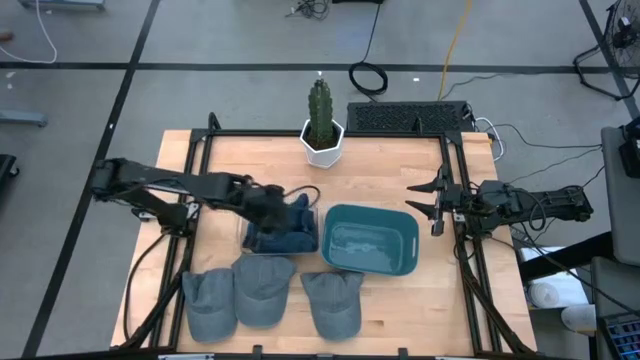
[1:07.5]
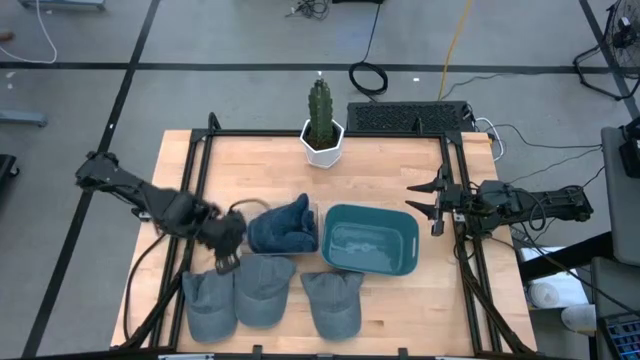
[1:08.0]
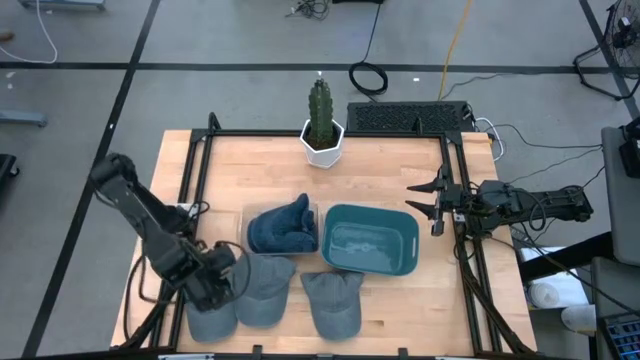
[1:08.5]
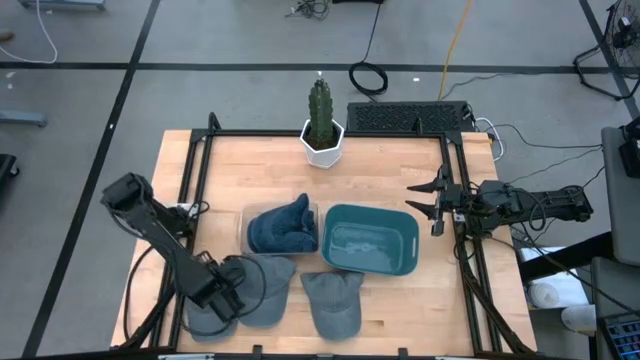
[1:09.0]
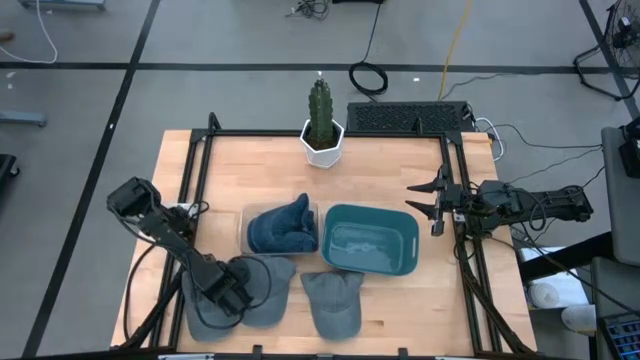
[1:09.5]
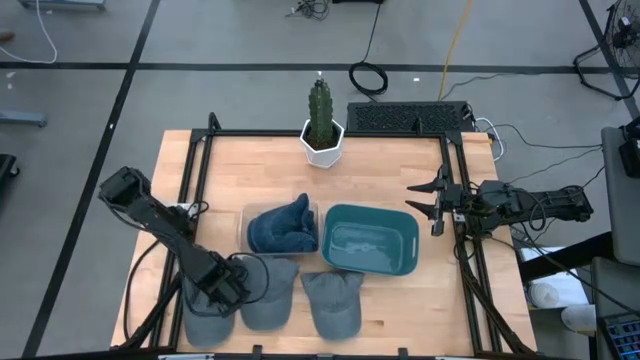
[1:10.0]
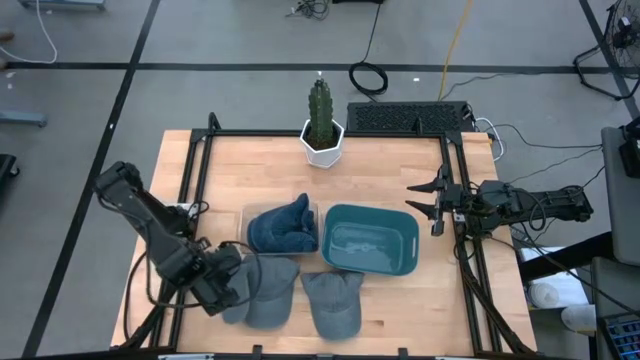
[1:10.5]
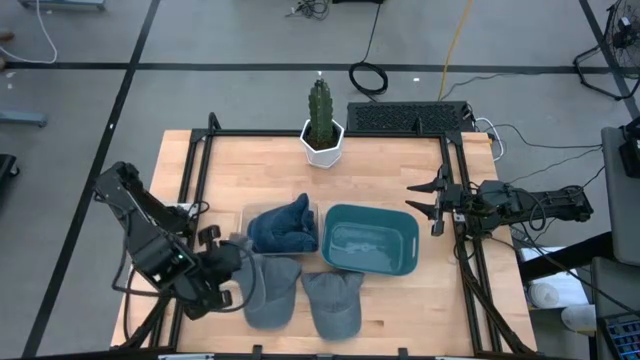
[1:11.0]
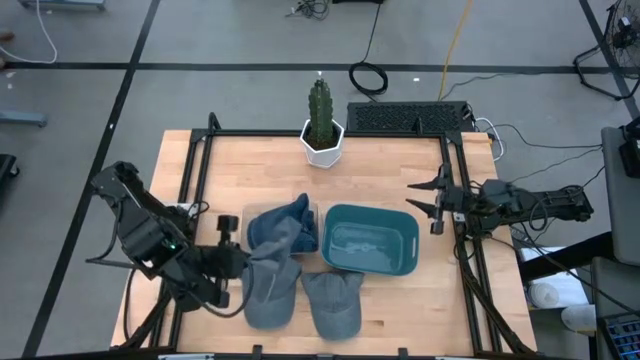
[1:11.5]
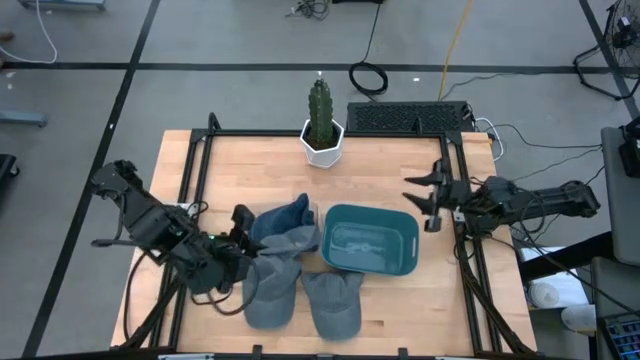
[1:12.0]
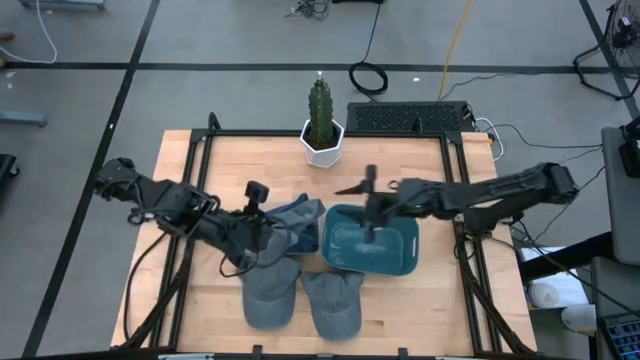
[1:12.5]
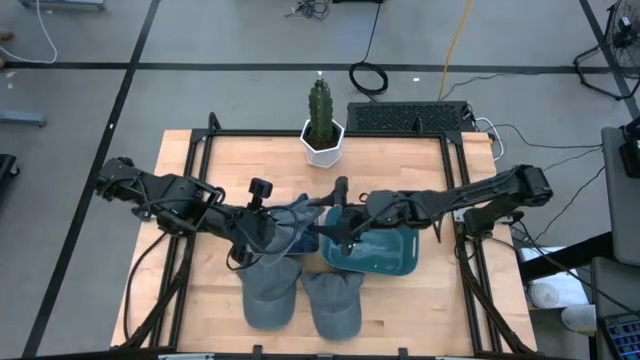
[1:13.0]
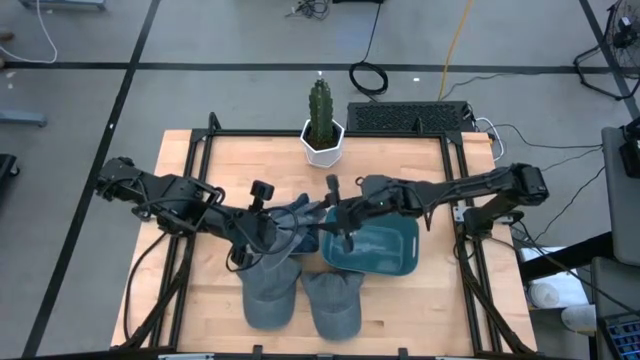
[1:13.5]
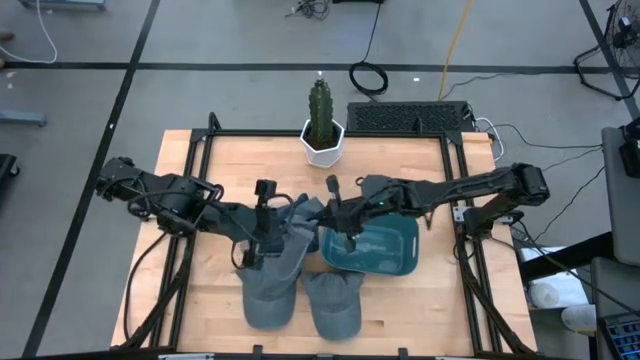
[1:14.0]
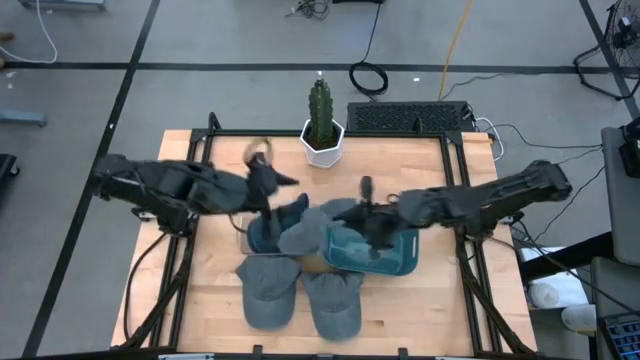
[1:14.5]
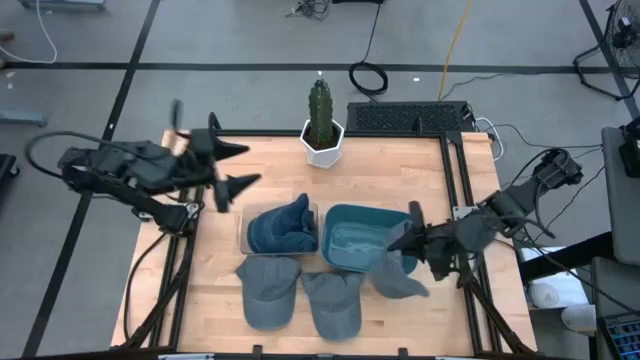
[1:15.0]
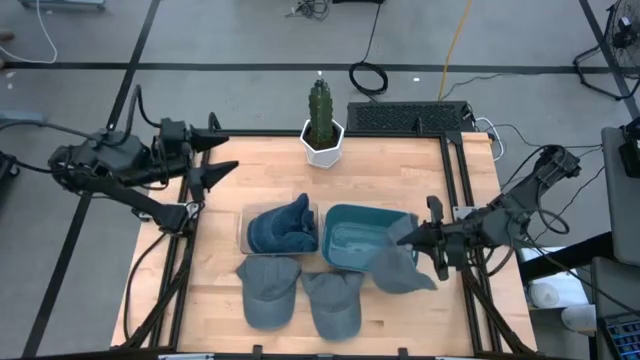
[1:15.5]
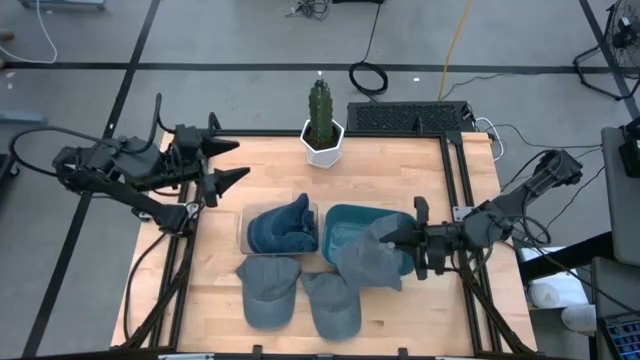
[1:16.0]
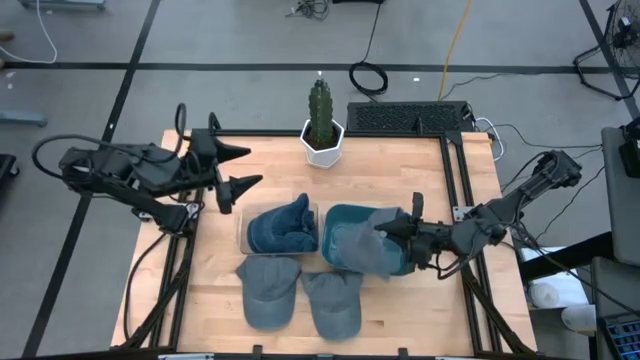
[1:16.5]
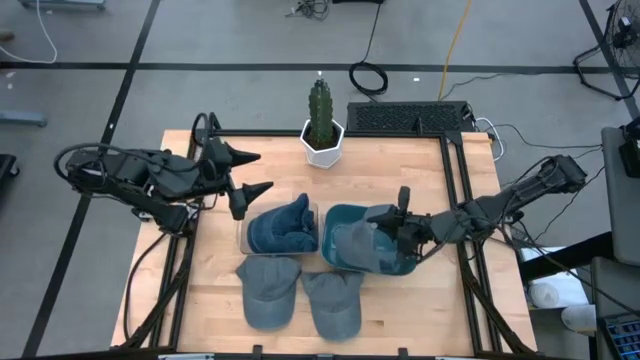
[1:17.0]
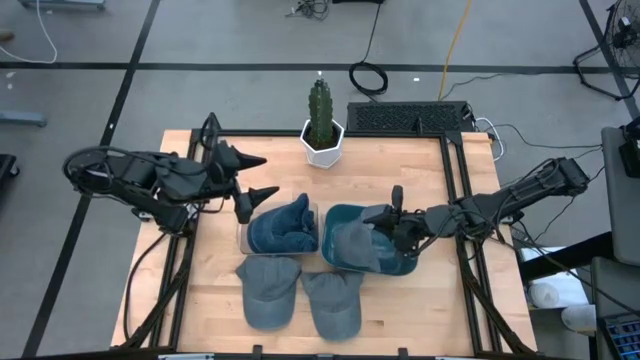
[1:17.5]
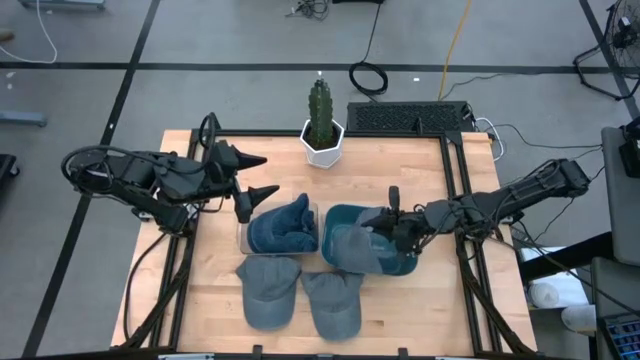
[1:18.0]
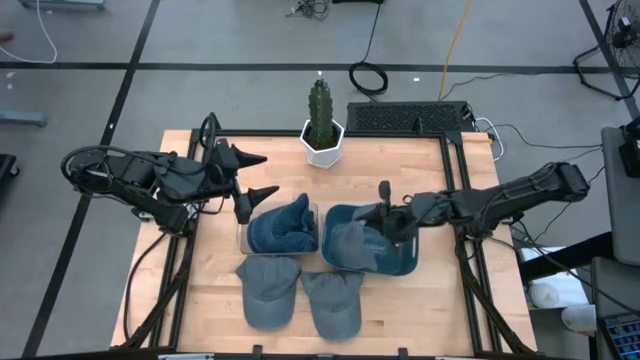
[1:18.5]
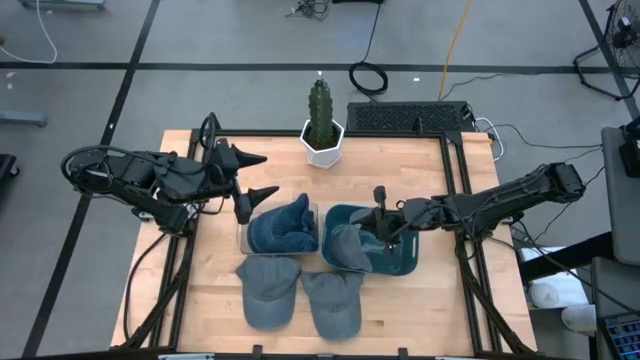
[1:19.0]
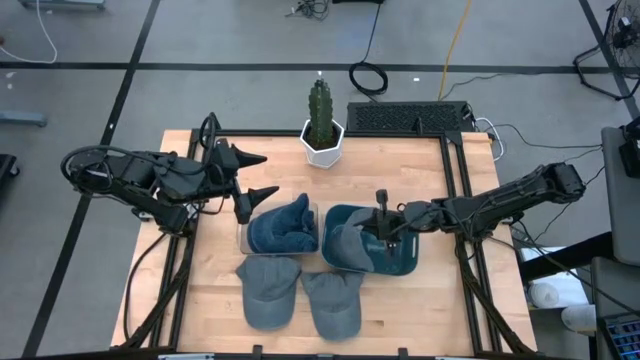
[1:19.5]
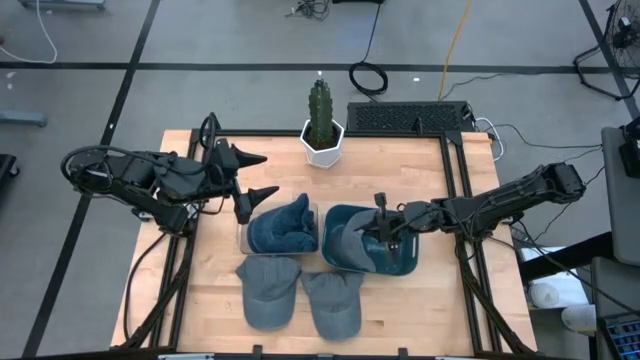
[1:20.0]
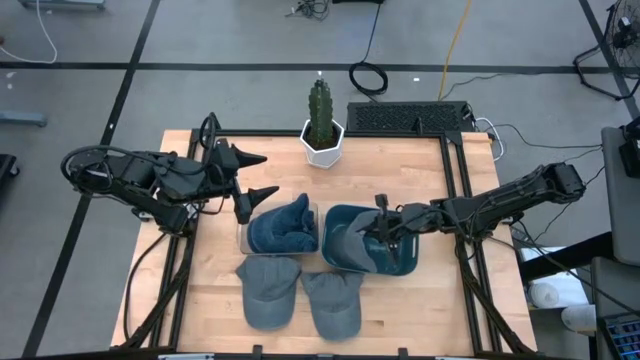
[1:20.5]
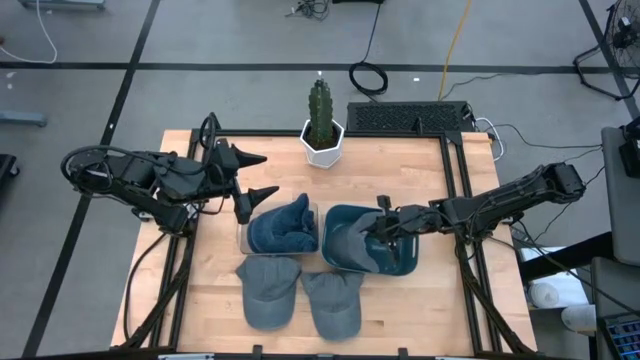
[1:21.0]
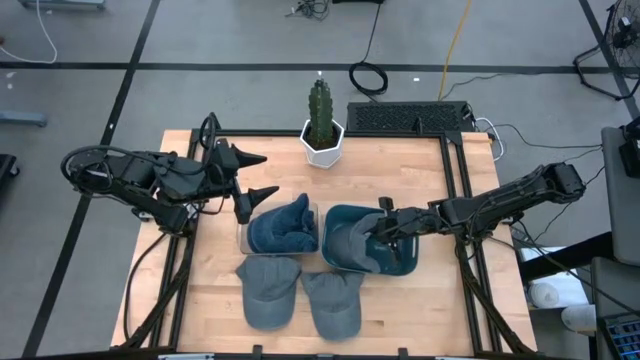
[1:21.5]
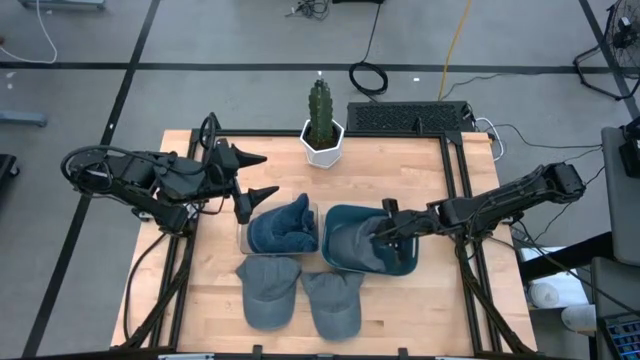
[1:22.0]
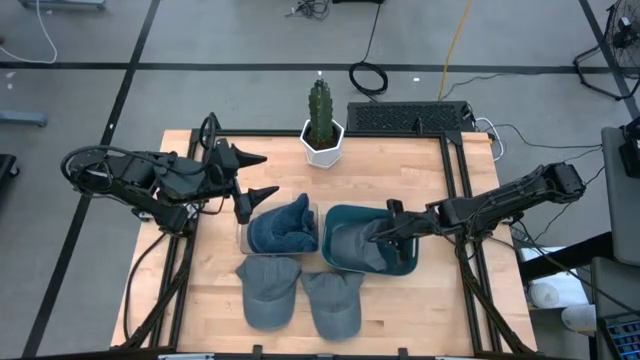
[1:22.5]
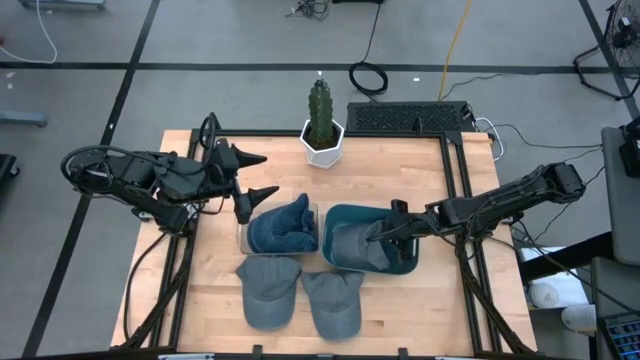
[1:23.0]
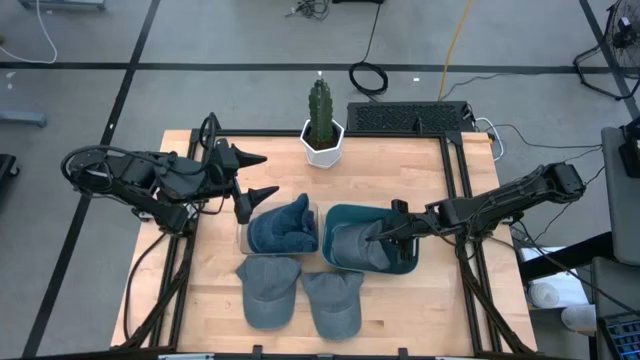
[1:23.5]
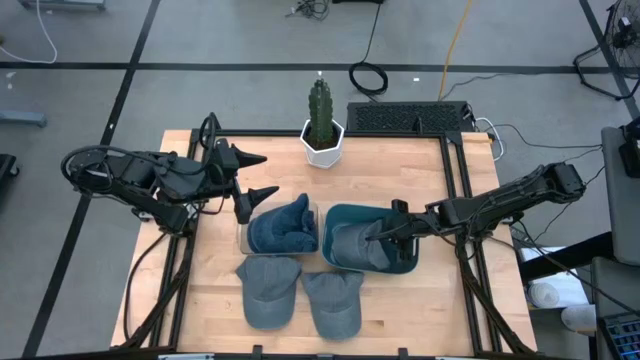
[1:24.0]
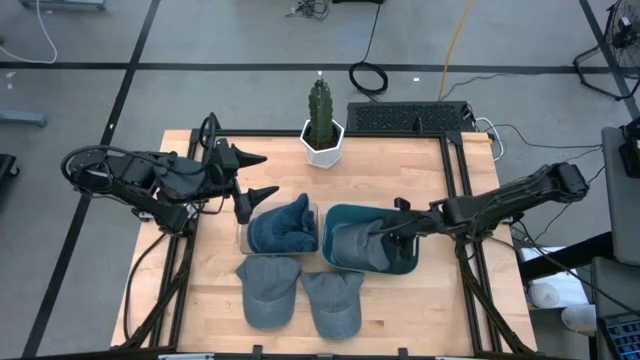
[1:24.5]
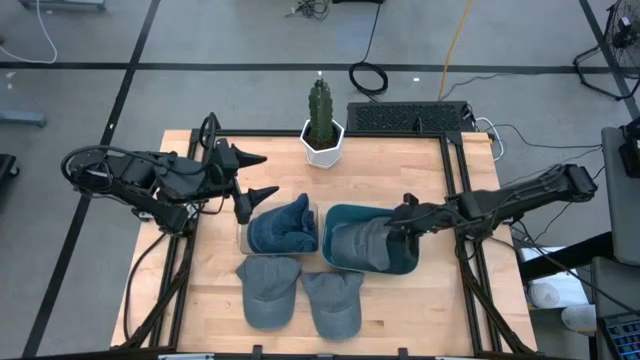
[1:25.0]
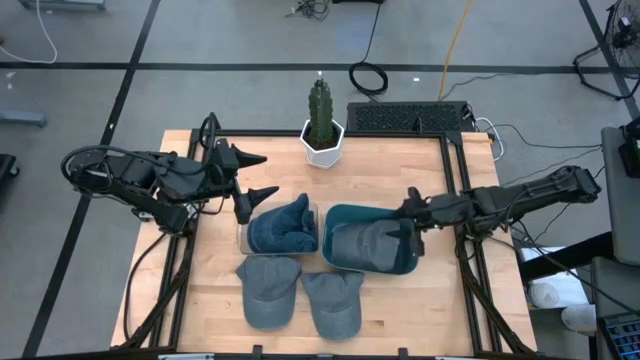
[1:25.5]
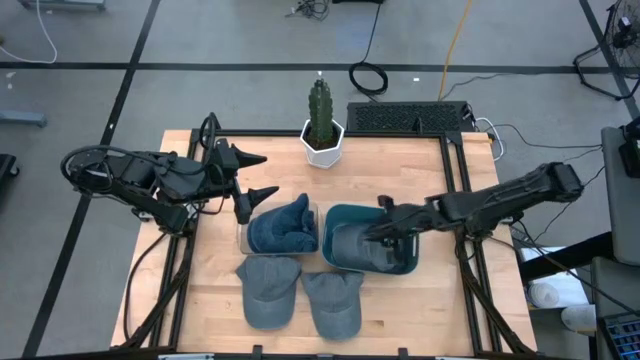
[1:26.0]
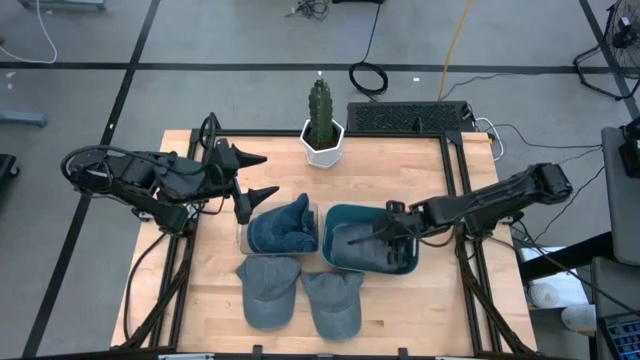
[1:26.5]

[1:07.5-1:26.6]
Task: Pick & Place hat
Put the left gray cap into the blue bin

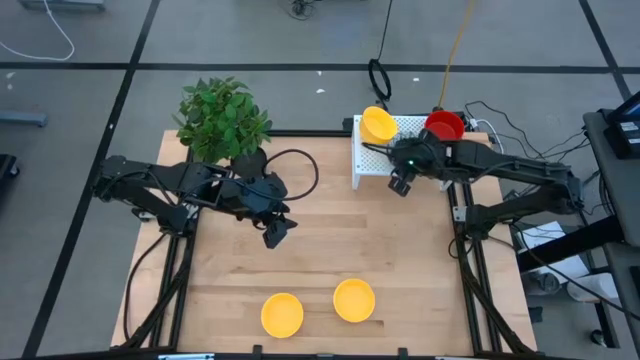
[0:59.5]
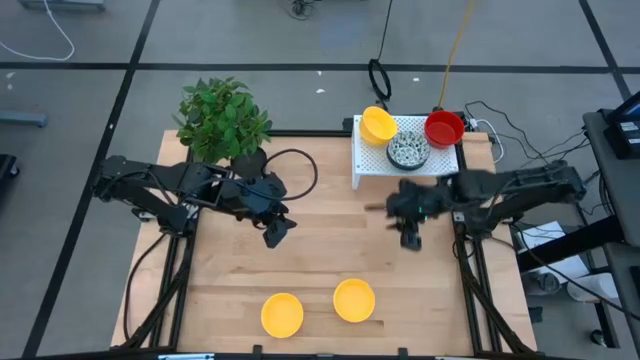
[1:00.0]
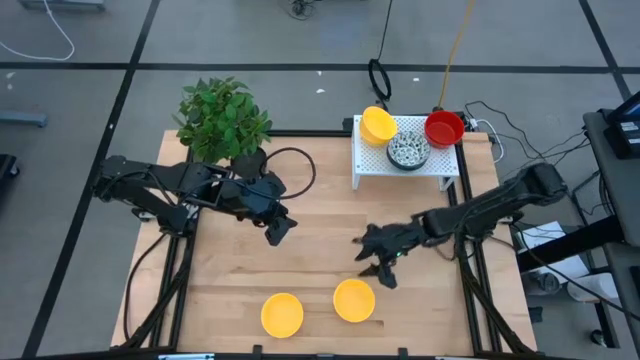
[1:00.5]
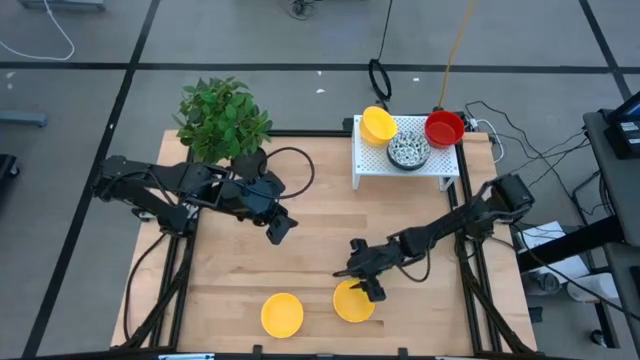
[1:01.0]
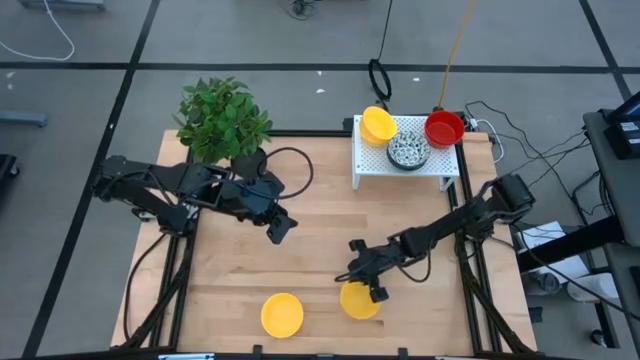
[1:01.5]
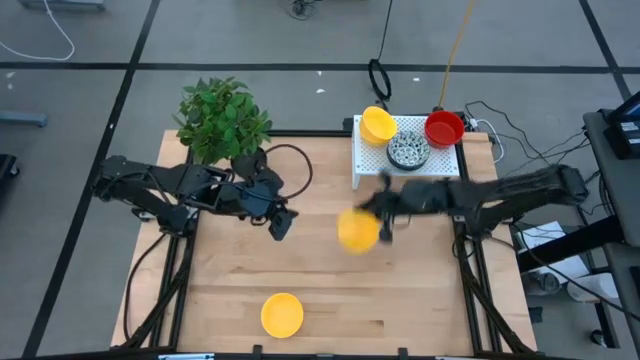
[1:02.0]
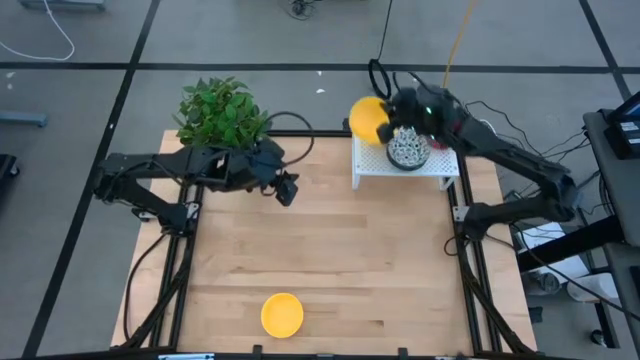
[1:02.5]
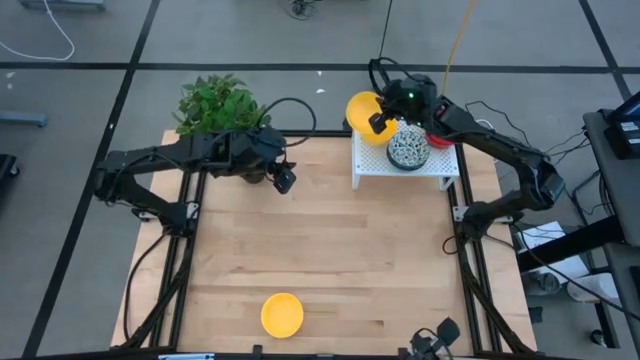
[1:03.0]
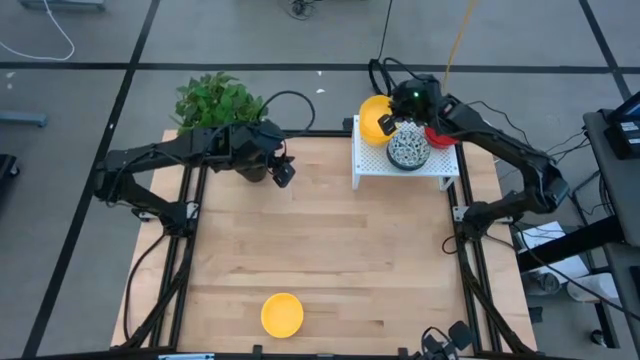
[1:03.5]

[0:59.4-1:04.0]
Task: Pick & Place Mini bowls
Stack the yellow bowl on top of the yellow bowls on the shelf
